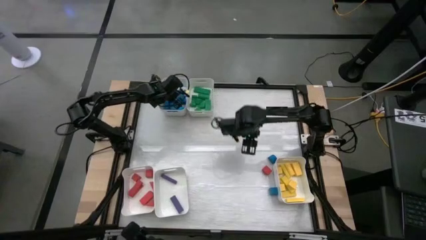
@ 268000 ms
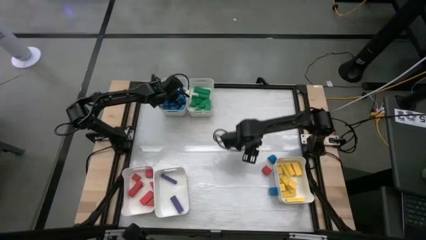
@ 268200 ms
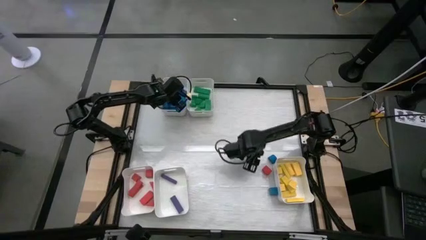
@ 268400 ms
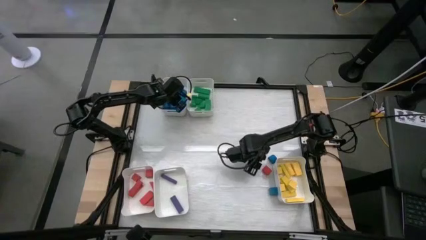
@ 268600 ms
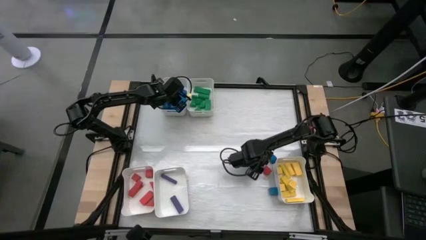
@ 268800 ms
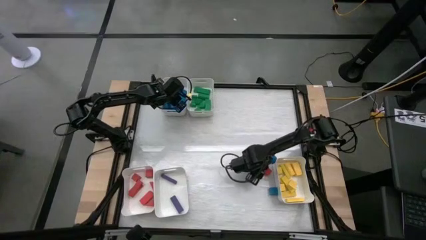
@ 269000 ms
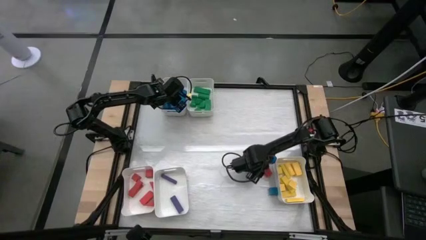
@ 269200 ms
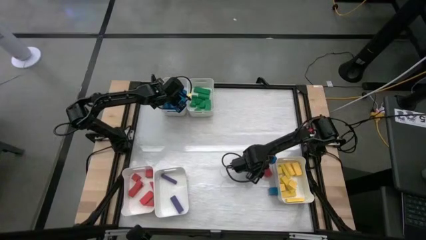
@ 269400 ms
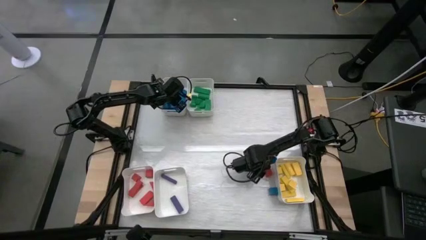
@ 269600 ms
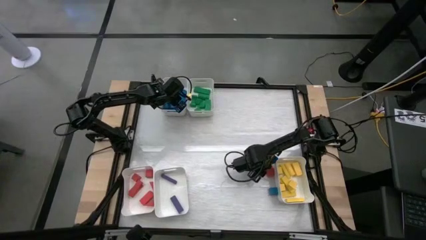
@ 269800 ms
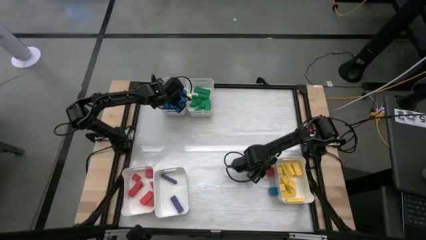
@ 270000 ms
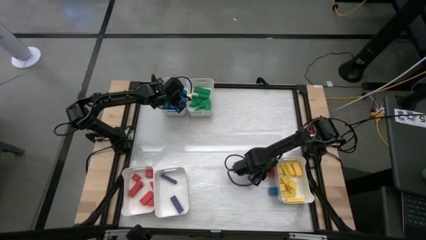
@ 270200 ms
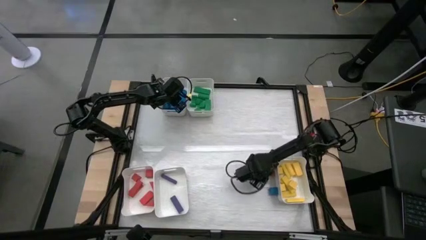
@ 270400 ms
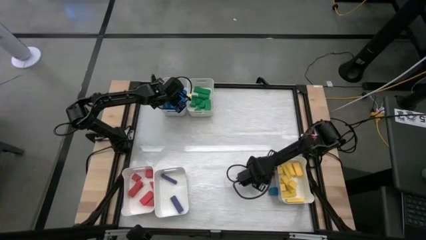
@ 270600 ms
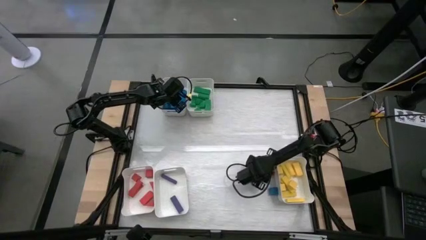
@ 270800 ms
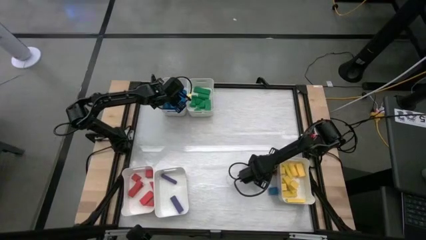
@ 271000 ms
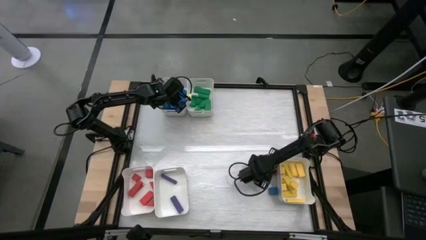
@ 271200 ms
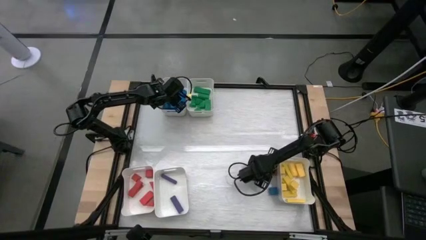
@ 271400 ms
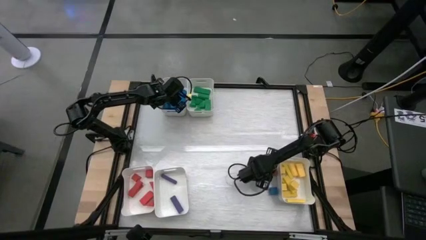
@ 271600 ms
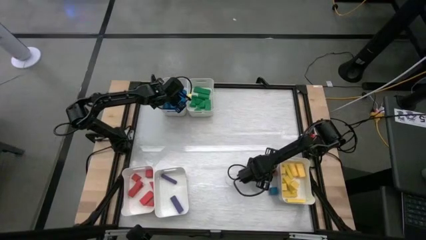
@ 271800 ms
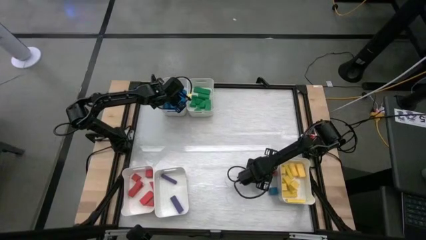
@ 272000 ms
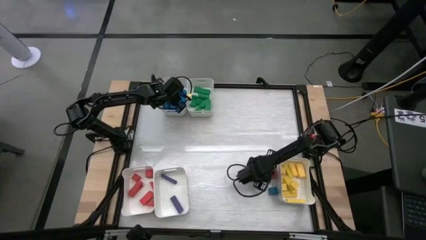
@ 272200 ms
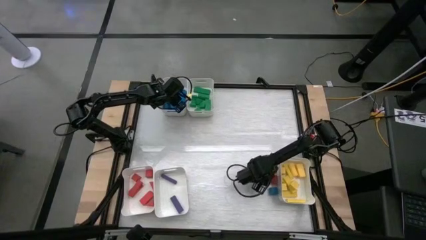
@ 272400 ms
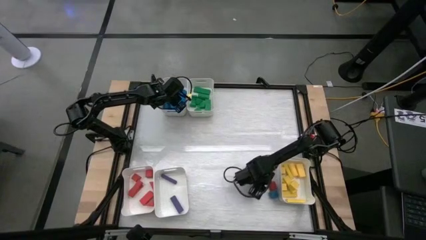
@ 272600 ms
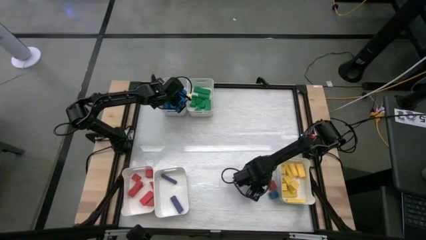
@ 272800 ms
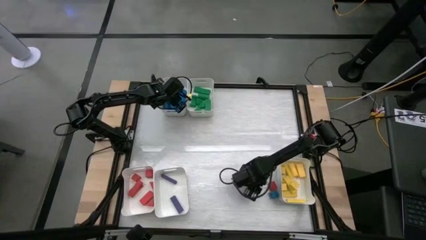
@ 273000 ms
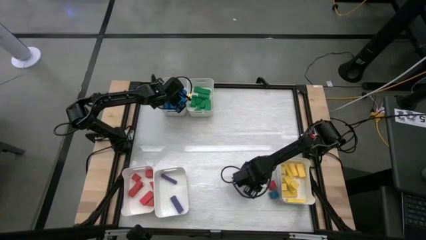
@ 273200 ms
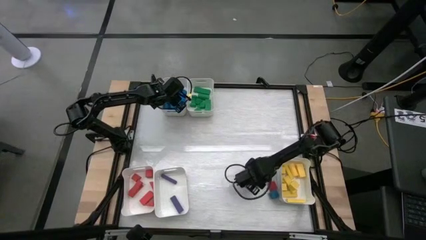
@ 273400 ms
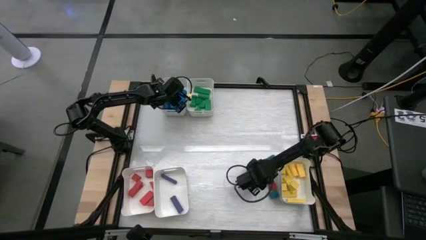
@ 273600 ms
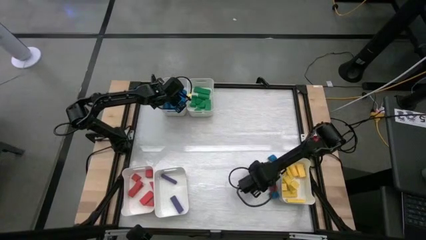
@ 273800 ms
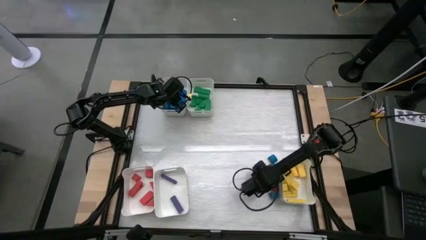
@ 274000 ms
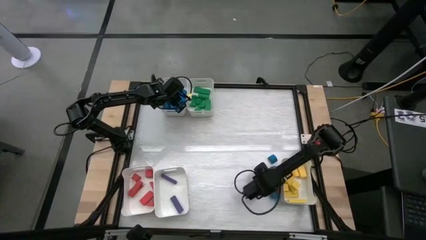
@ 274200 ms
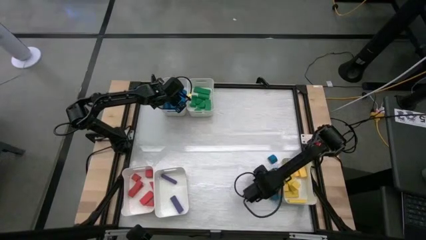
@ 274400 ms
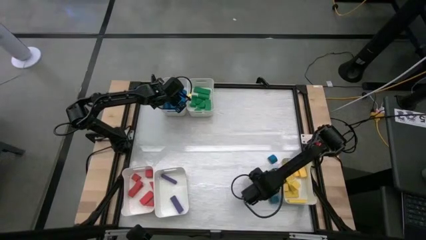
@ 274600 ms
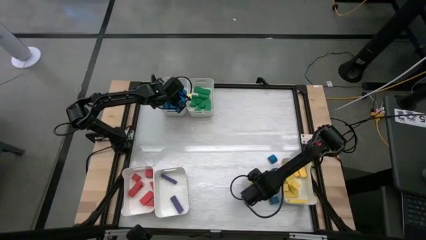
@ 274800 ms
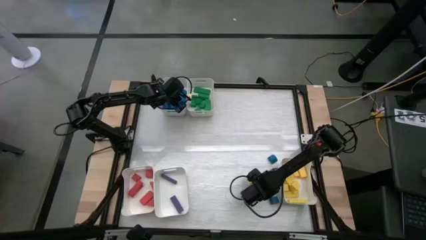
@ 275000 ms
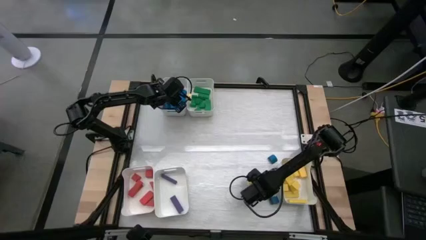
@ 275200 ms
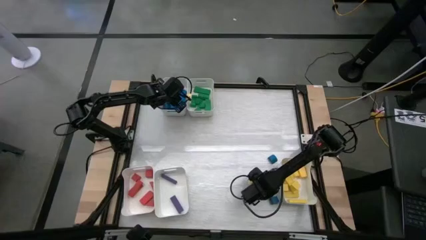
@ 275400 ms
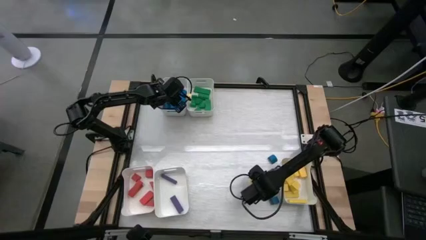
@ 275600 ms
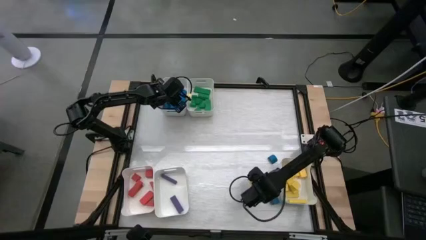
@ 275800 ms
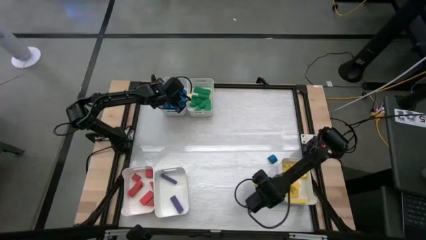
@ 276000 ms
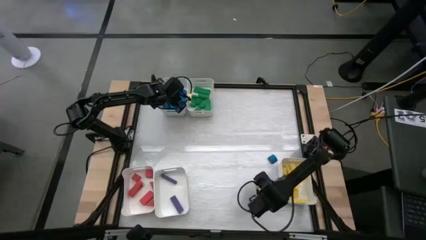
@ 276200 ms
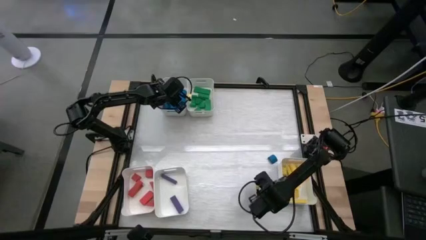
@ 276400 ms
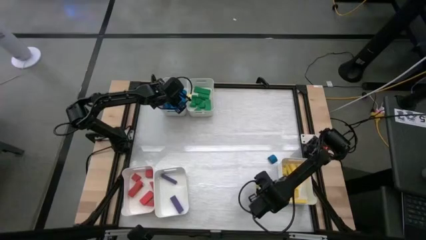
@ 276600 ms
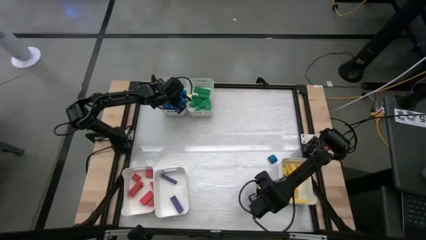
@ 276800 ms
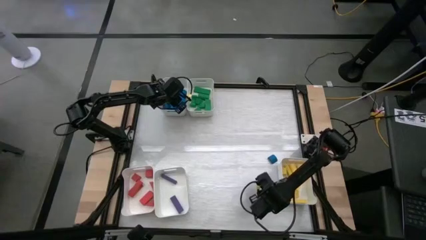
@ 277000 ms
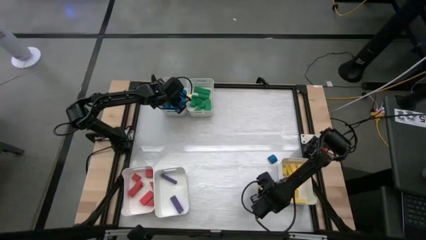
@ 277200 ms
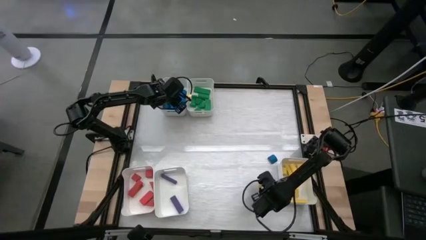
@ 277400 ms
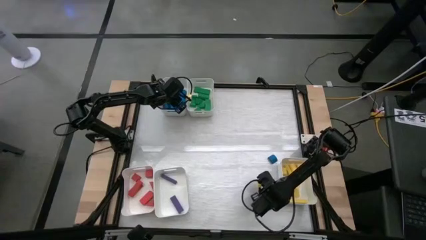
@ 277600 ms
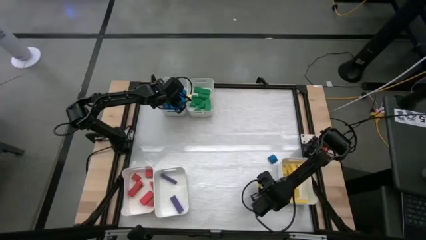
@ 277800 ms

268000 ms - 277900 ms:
Task: Sort blocks
Put the red block into the bottom left white bin

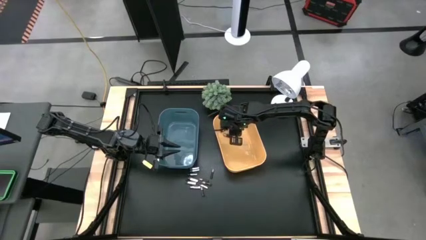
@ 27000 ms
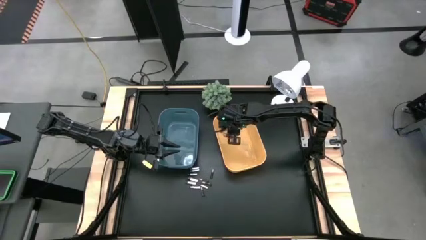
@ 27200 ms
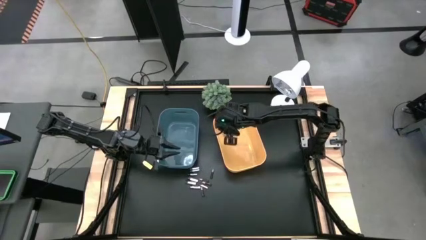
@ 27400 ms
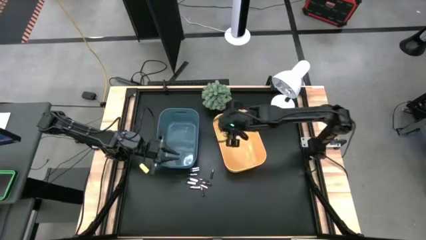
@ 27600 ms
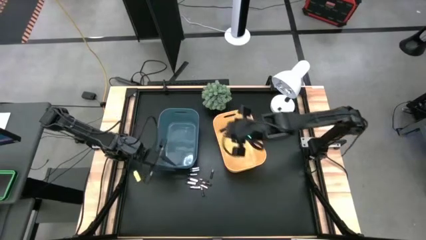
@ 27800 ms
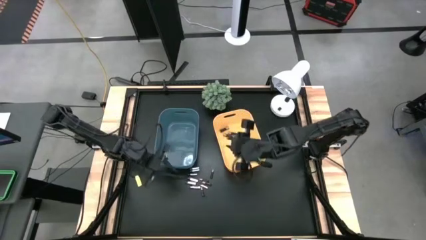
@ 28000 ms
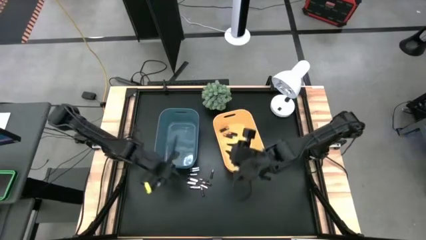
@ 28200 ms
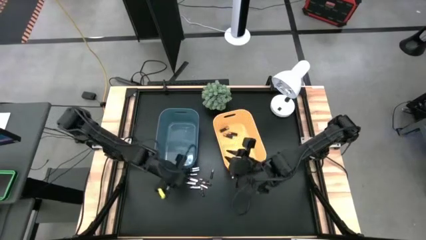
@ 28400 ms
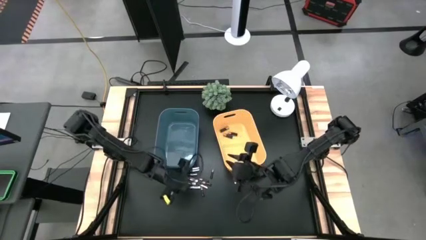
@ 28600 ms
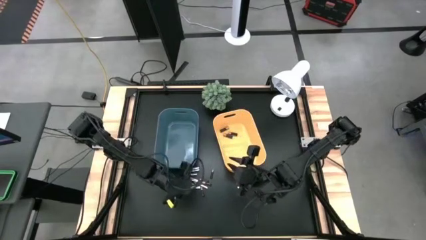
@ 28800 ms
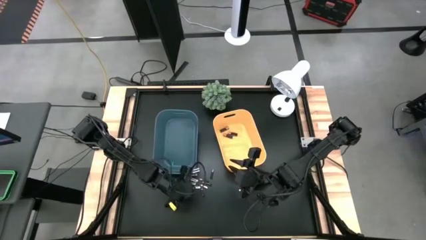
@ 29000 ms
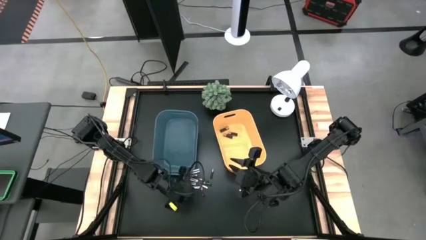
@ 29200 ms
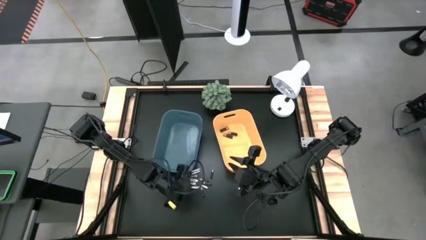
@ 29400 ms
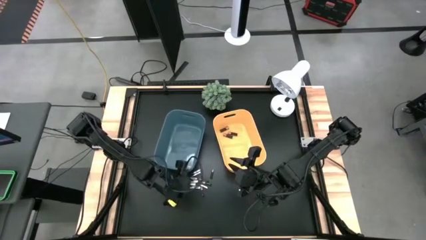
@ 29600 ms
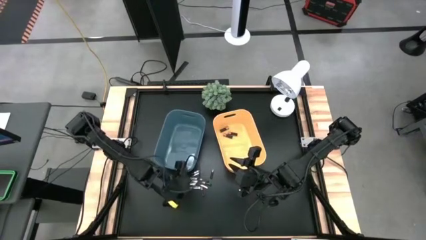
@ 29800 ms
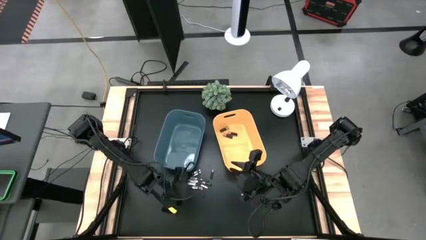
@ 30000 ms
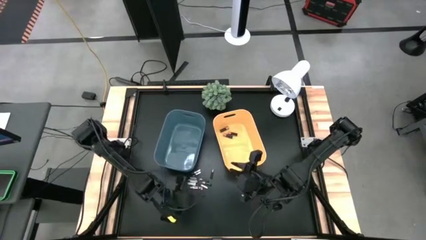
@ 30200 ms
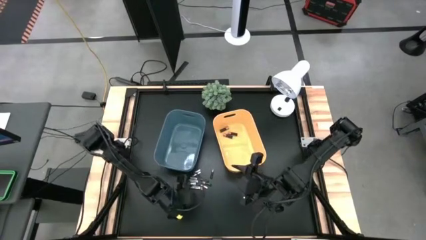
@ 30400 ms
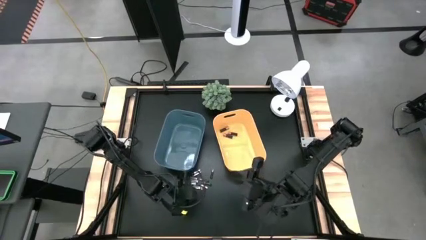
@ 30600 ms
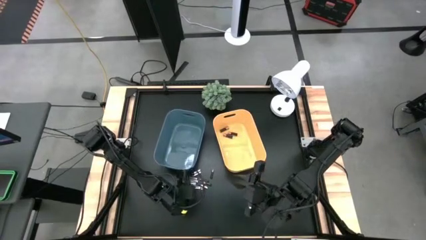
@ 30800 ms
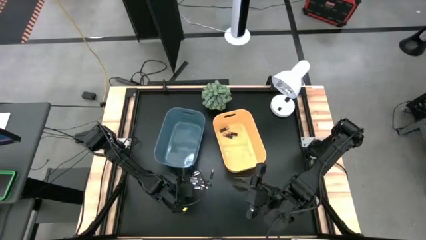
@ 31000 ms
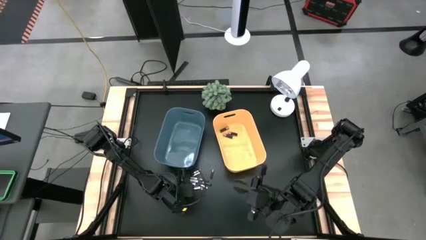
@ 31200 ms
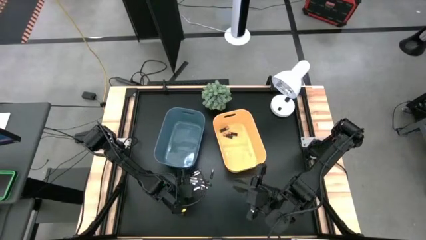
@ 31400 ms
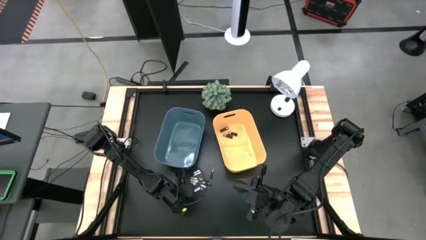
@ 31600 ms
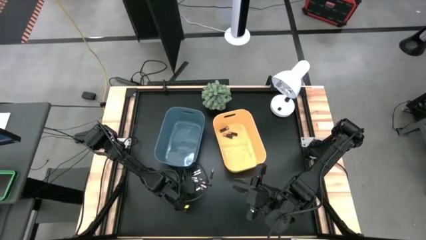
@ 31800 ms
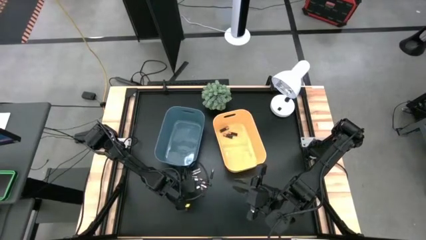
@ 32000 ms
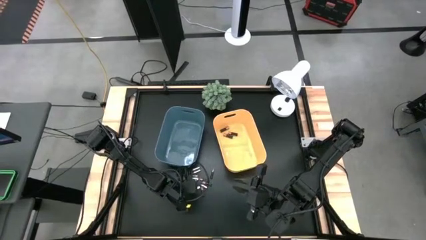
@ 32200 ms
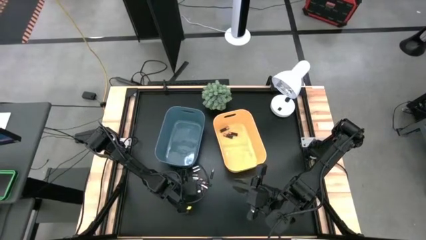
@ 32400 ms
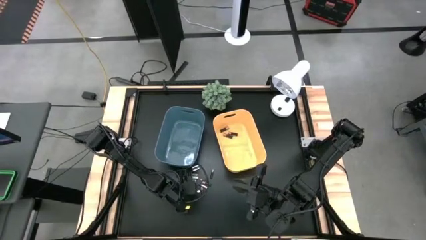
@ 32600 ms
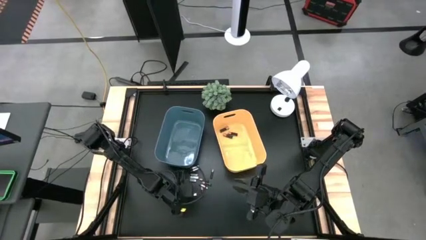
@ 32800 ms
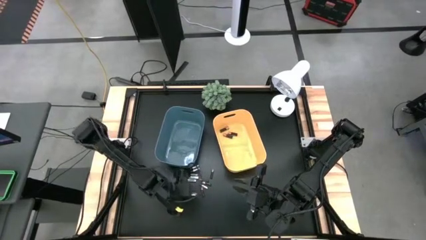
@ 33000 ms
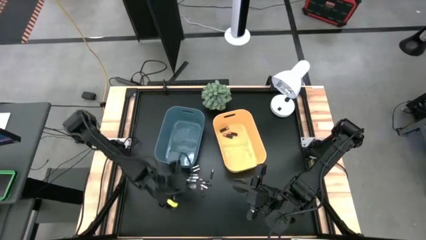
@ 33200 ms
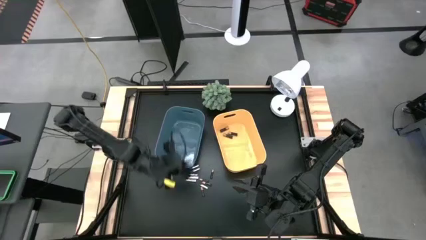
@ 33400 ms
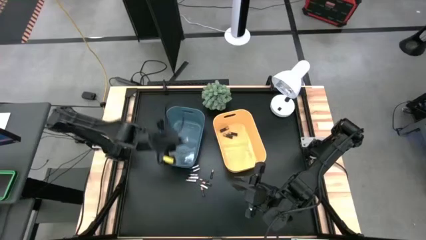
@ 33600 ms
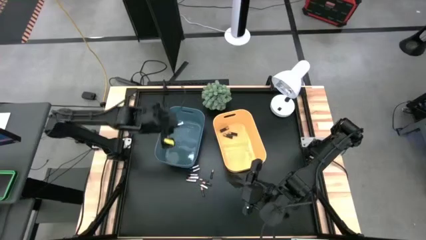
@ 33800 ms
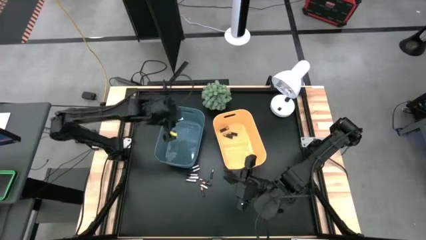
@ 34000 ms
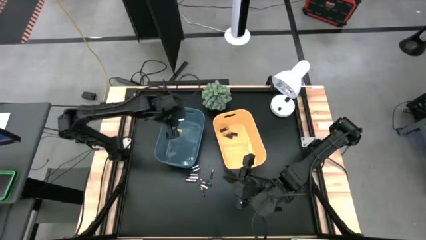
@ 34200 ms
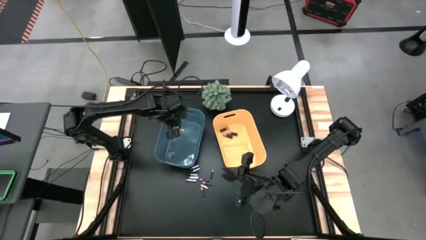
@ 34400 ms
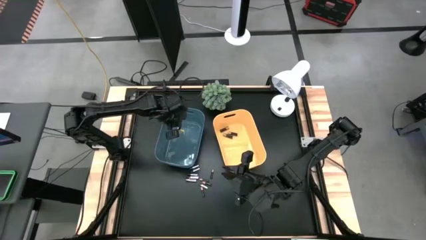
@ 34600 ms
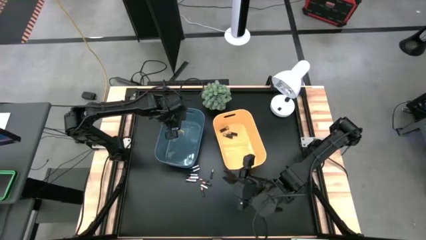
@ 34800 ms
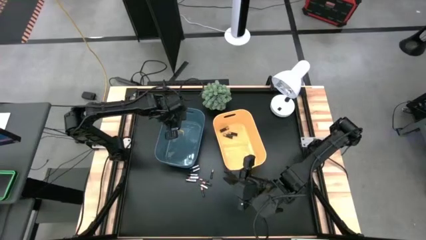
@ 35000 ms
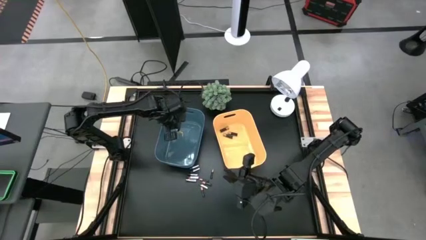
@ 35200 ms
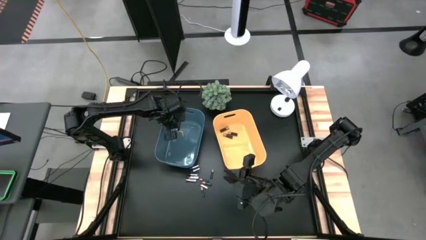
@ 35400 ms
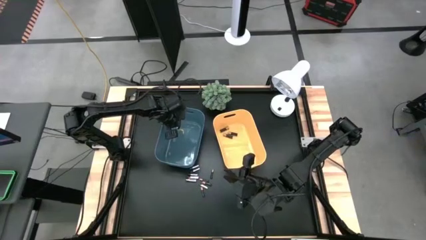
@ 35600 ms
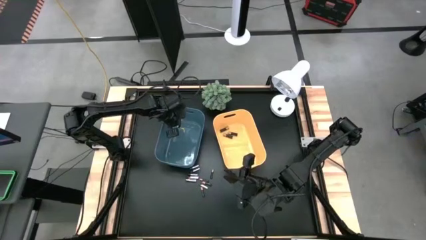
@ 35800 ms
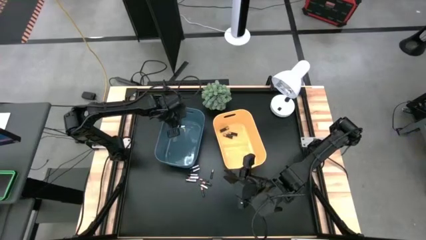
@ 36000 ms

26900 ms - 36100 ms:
Task: Sort batteries
Put the silver battery into the blue bin
